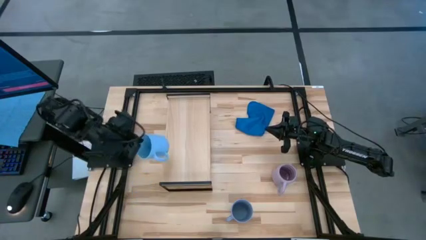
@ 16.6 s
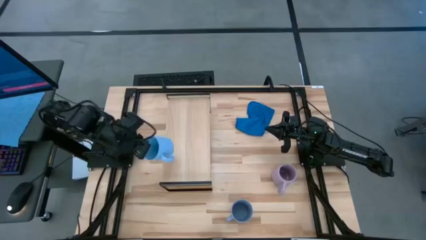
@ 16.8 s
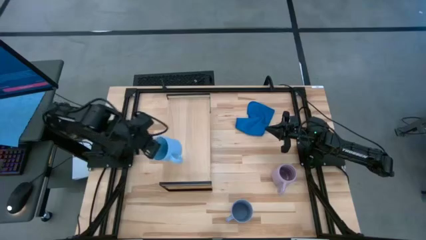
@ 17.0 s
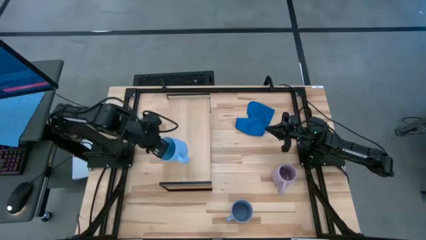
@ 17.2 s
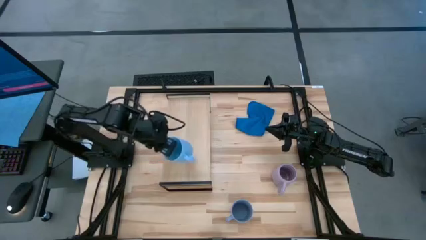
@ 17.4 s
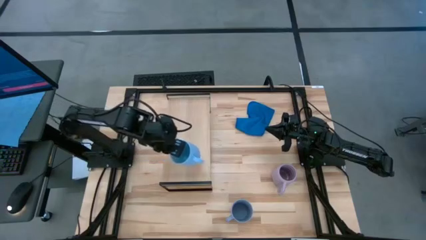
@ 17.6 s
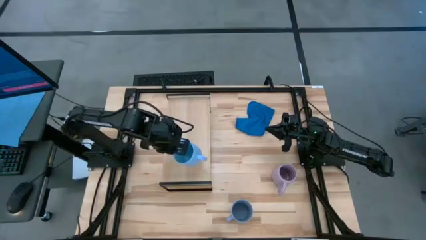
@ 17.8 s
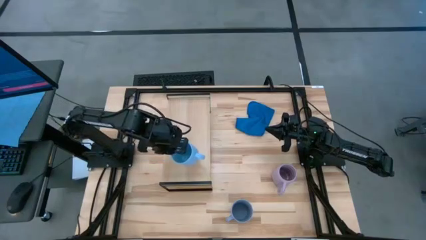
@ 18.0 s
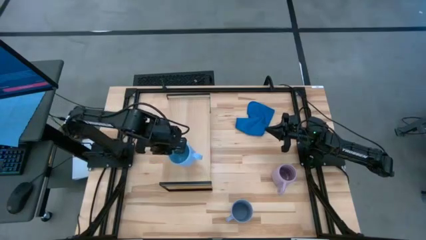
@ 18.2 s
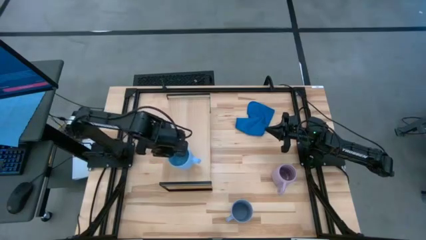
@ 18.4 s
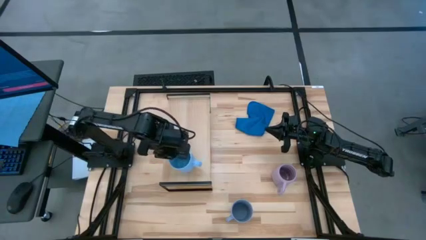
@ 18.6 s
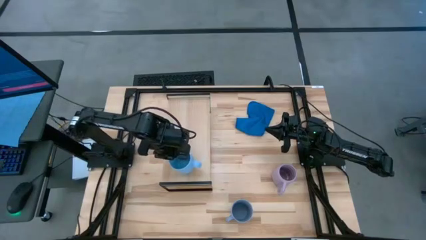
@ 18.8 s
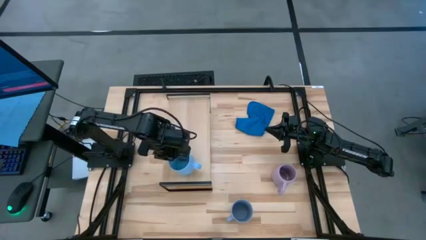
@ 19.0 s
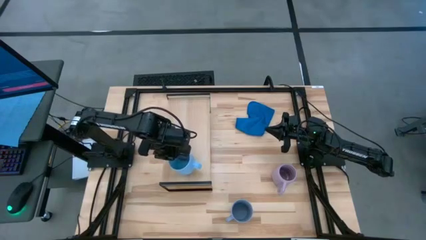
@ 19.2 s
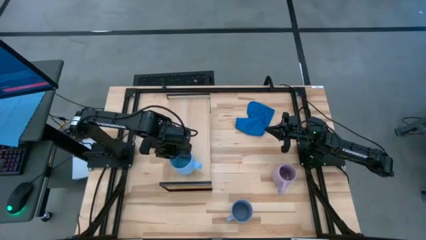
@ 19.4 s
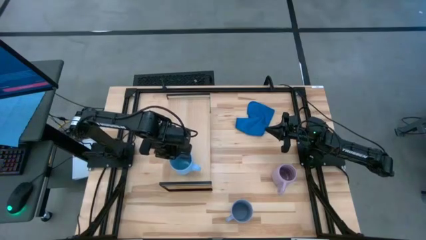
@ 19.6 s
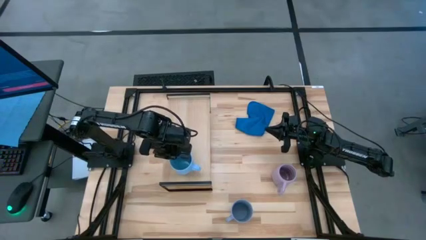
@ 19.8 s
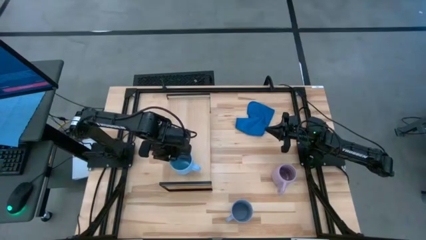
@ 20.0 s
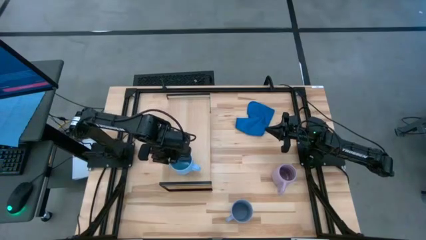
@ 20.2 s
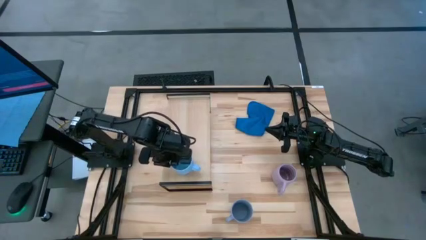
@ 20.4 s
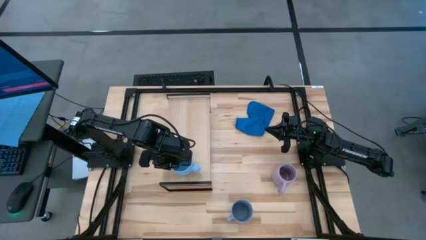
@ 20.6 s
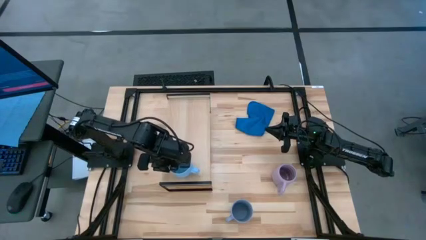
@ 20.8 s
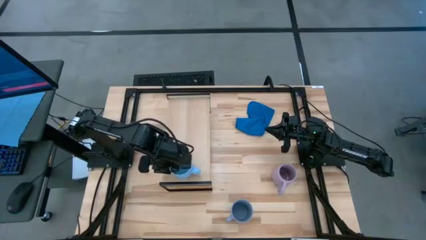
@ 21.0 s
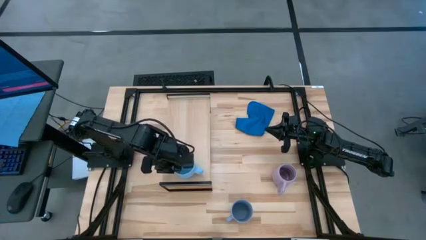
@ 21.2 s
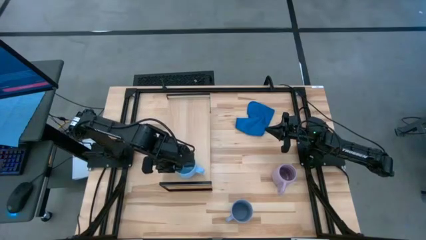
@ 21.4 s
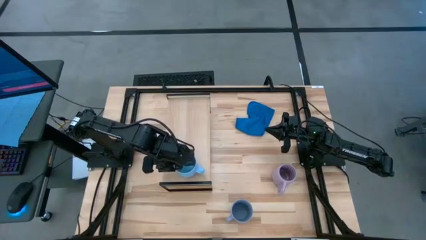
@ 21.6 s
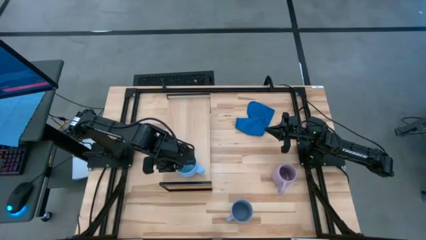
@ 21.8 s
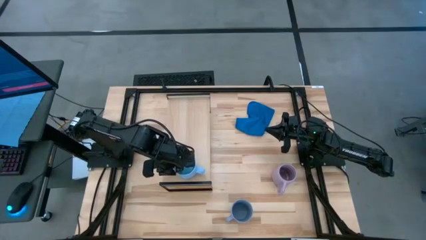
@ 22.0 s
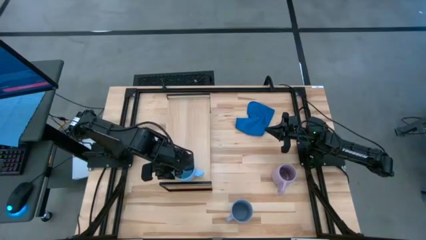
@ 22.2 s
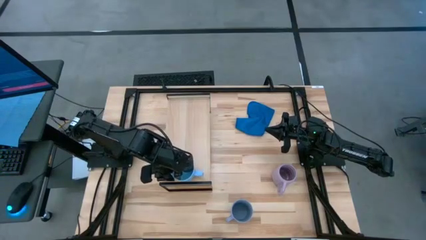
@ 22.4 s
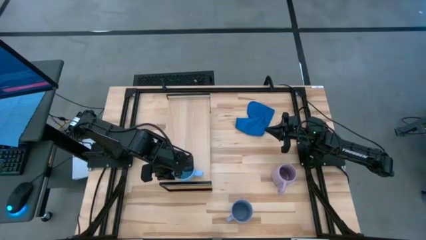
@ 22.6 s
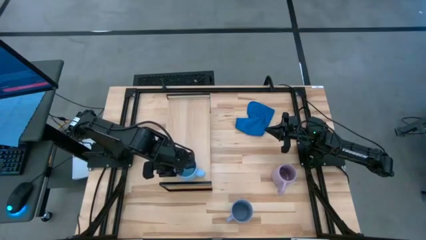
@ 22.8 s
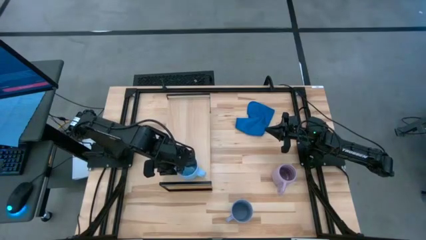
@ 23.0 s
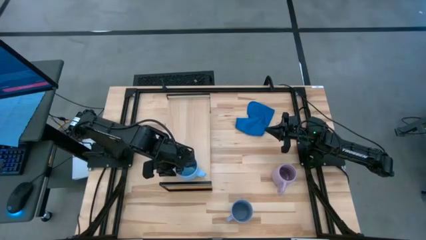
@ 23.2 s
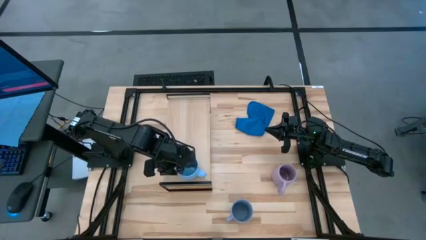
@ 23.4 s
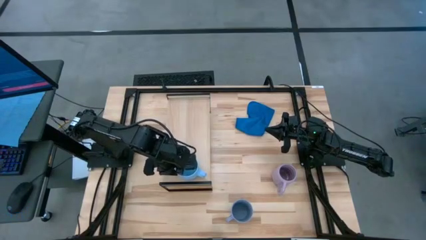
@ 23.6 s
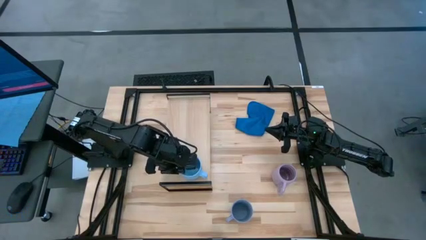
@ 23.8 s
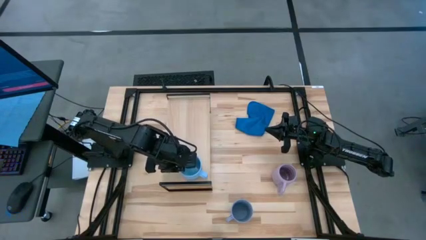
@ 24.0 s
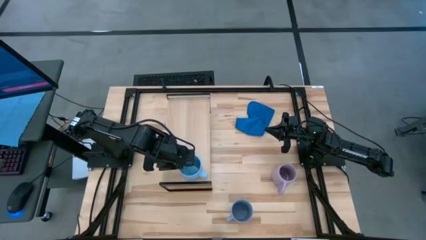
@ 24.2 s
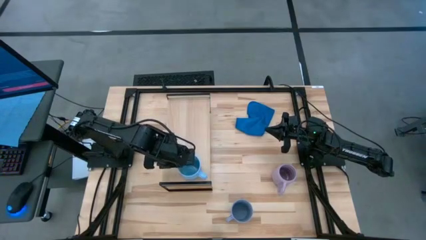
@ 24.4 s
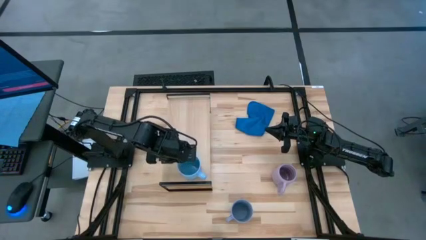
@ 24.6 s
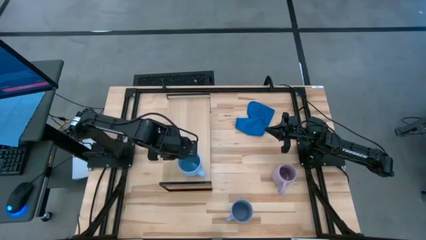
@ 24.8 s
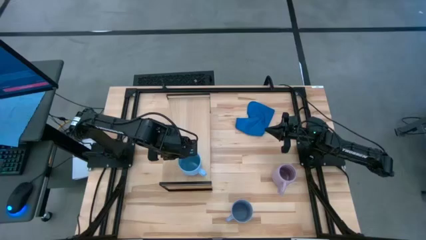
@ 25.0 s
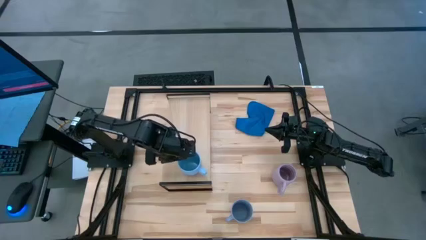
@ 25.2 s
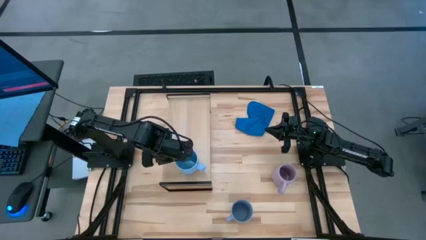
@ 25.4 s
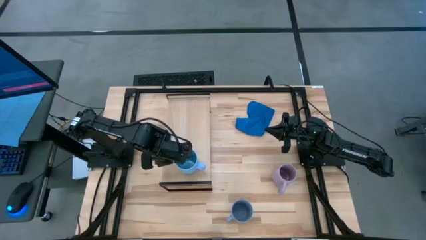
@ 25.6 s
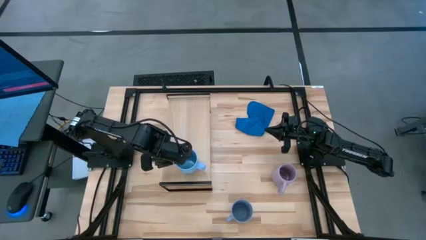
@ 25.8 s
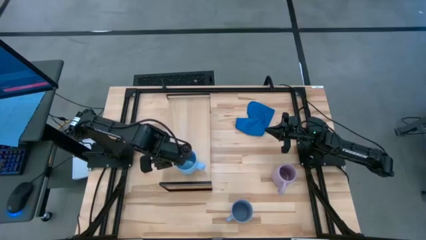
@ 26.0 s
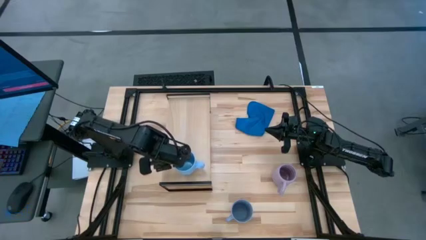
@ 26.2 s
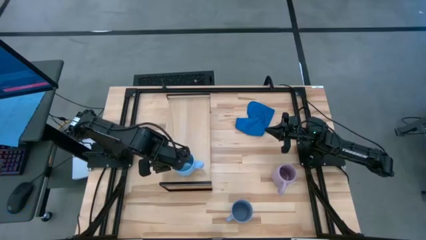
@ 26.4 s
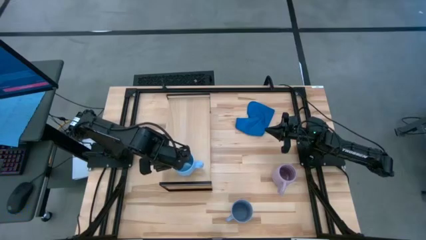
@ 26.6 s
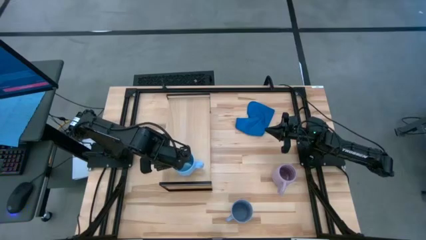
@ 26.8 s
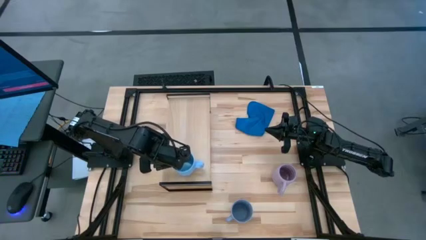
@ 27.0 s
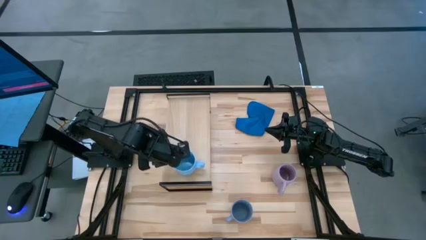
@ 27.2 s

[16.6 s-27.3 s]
Task: Stack small to large cups/mugs on shelf
Put the light blue mug on the shelf
